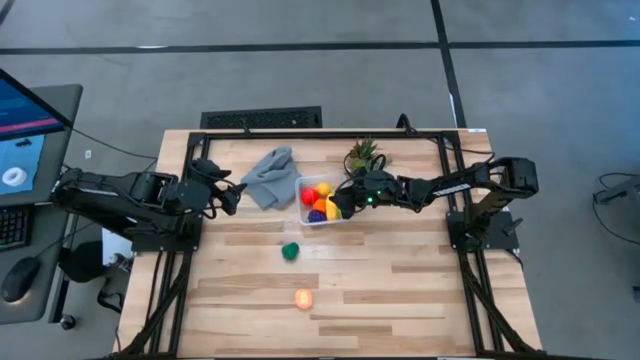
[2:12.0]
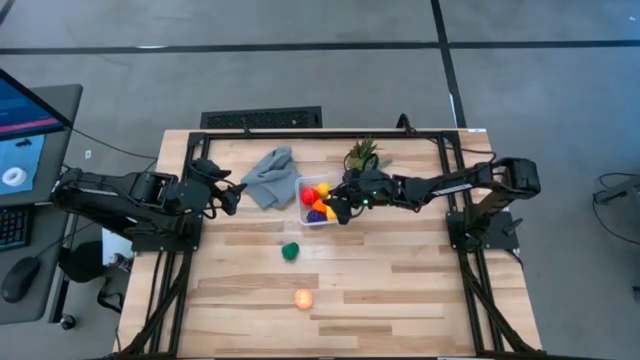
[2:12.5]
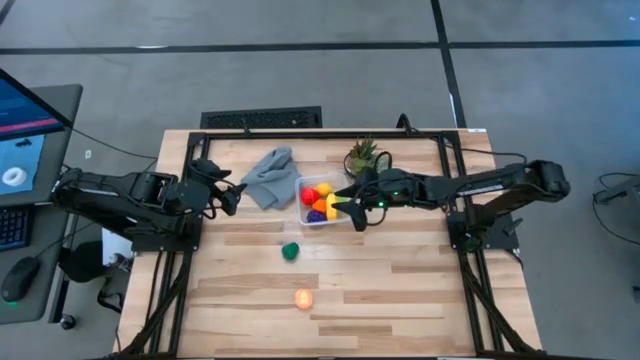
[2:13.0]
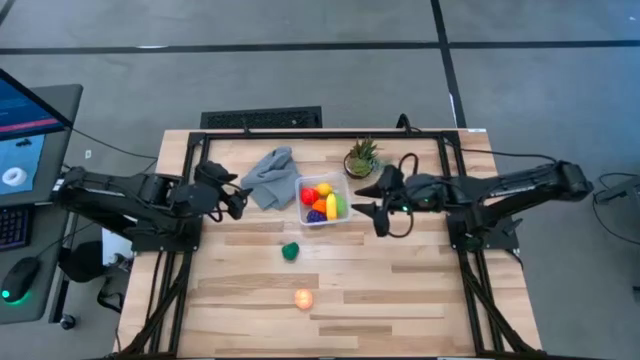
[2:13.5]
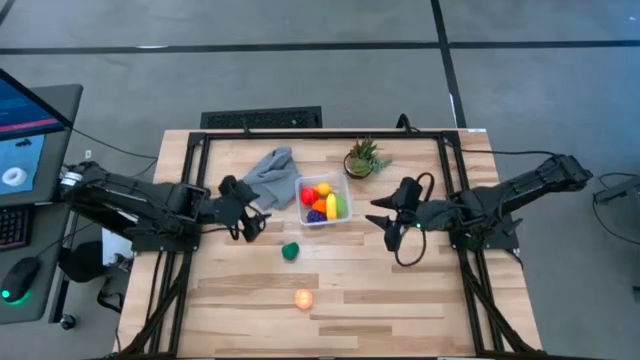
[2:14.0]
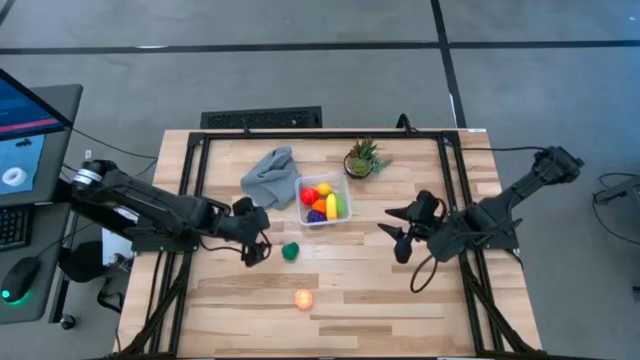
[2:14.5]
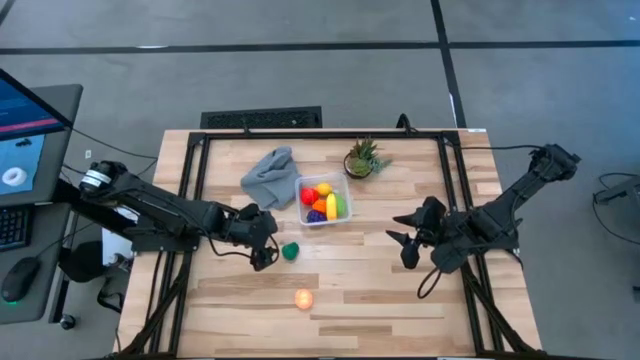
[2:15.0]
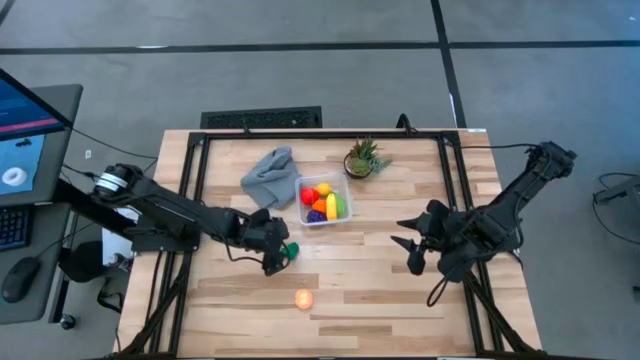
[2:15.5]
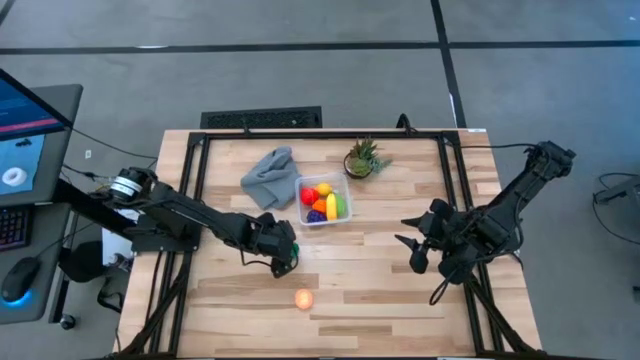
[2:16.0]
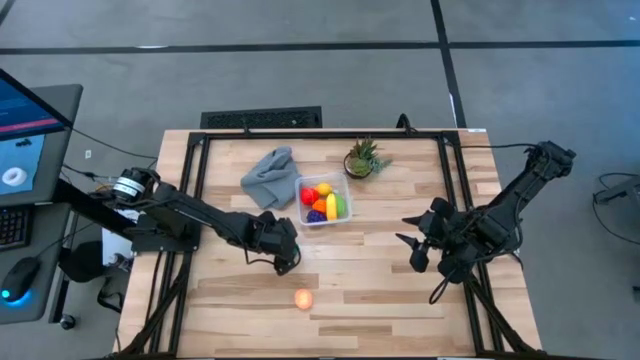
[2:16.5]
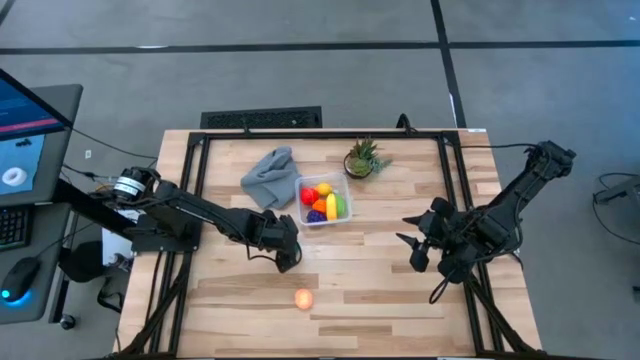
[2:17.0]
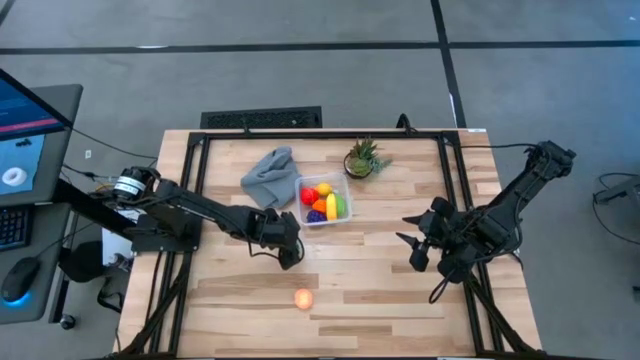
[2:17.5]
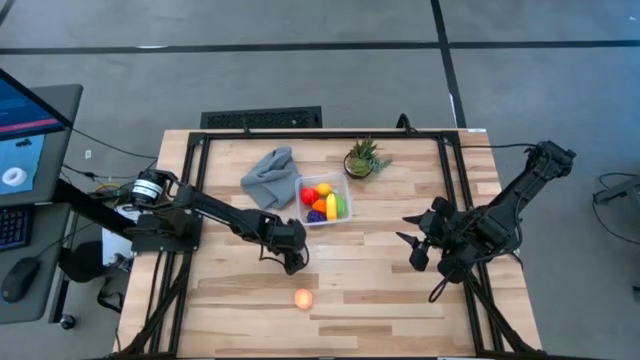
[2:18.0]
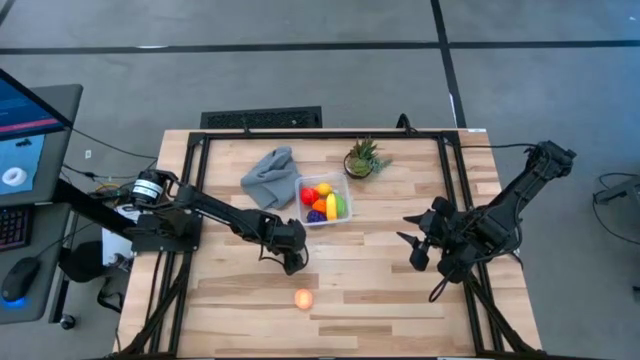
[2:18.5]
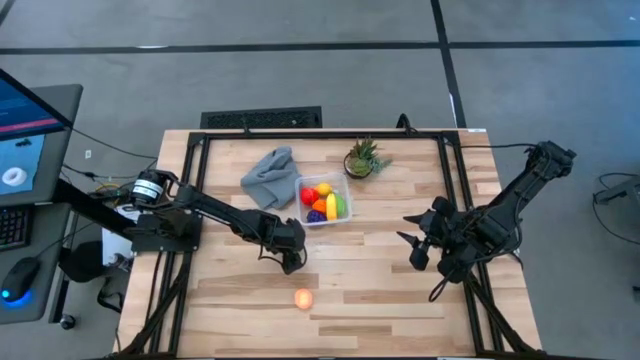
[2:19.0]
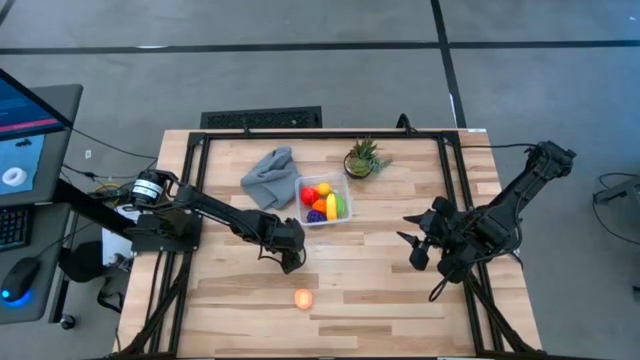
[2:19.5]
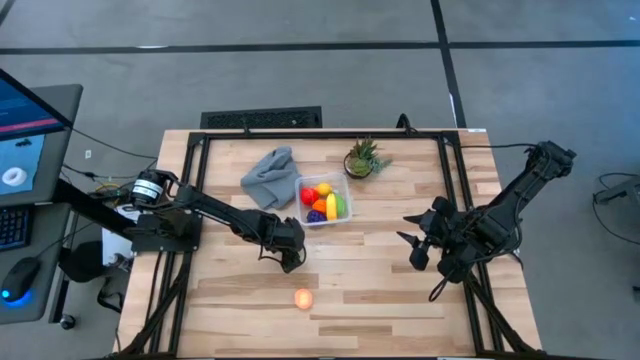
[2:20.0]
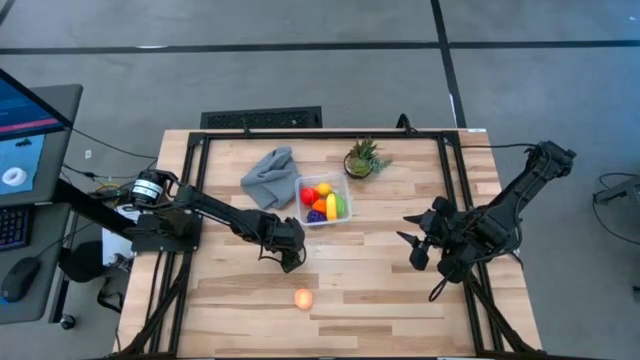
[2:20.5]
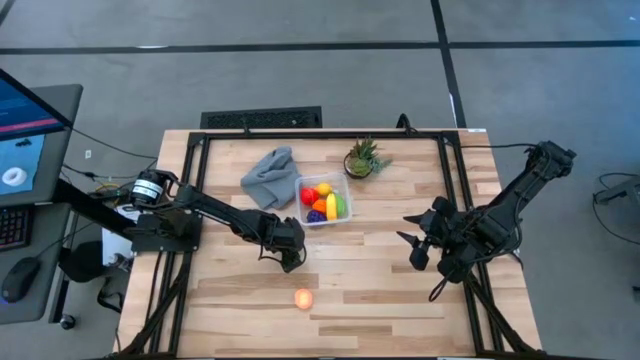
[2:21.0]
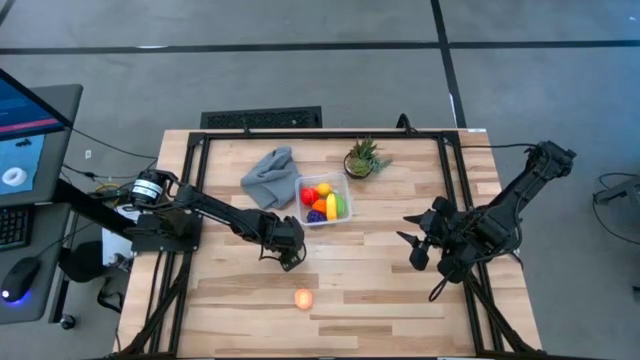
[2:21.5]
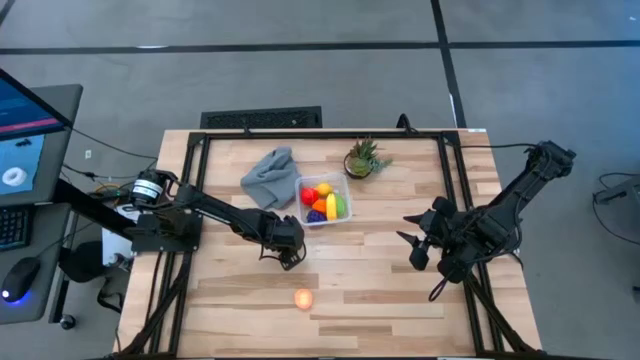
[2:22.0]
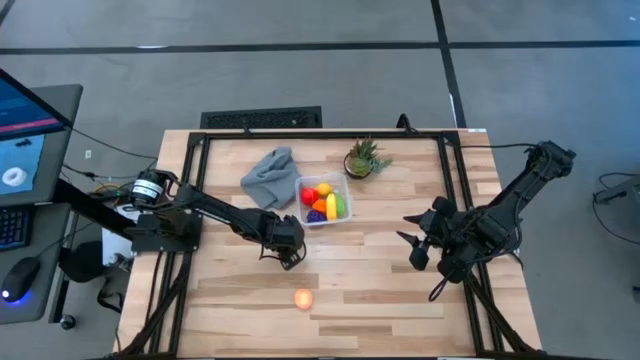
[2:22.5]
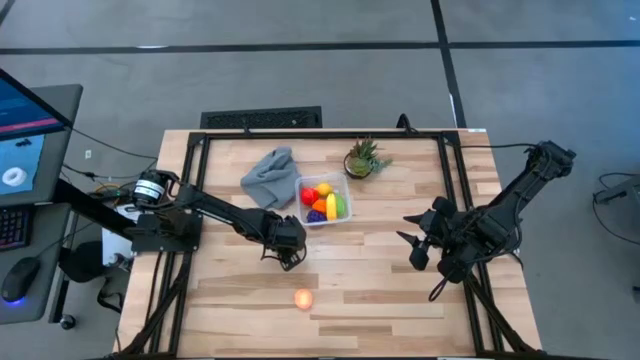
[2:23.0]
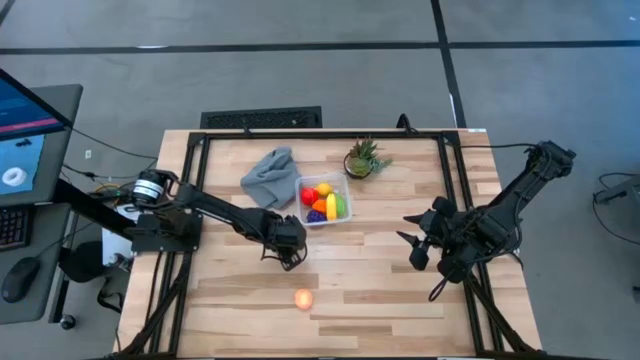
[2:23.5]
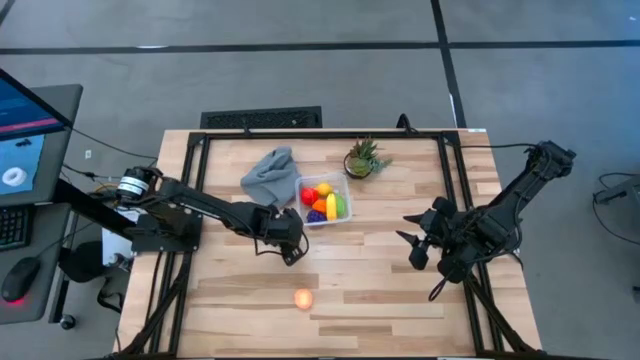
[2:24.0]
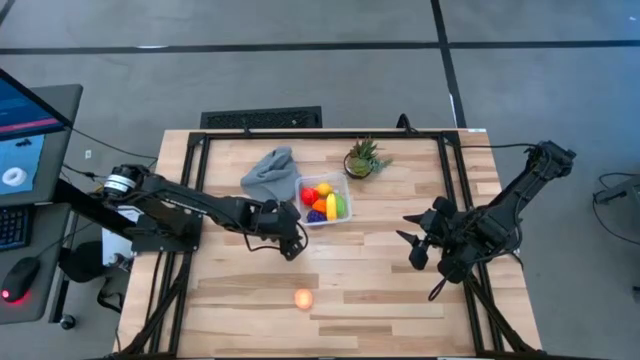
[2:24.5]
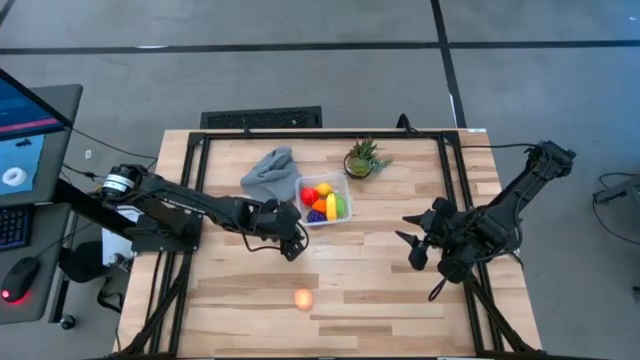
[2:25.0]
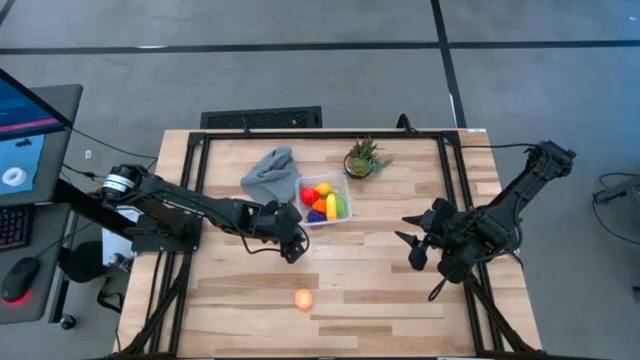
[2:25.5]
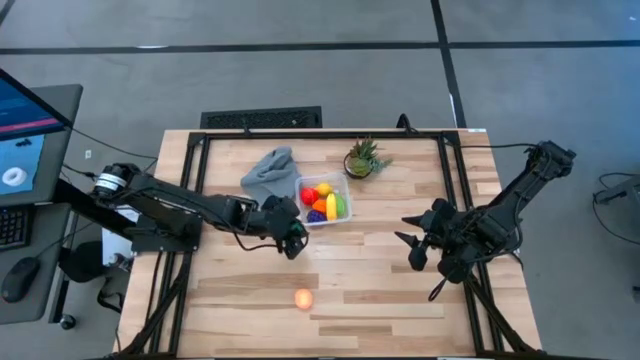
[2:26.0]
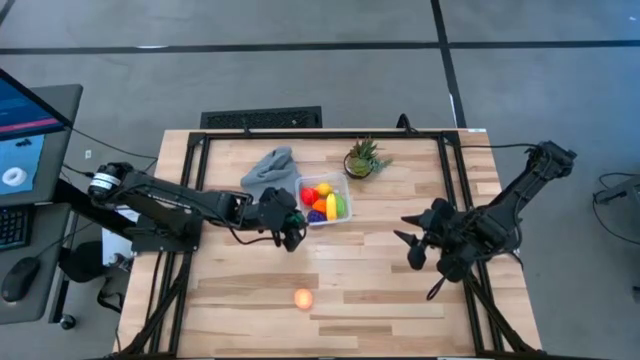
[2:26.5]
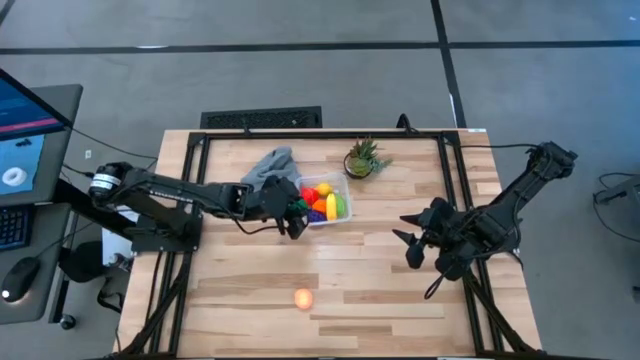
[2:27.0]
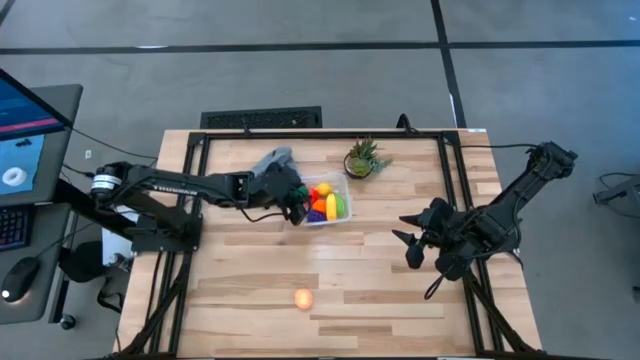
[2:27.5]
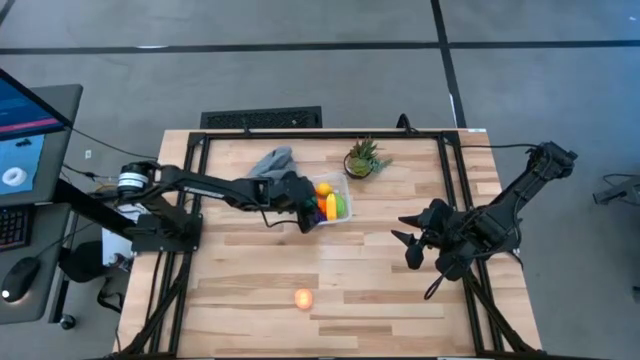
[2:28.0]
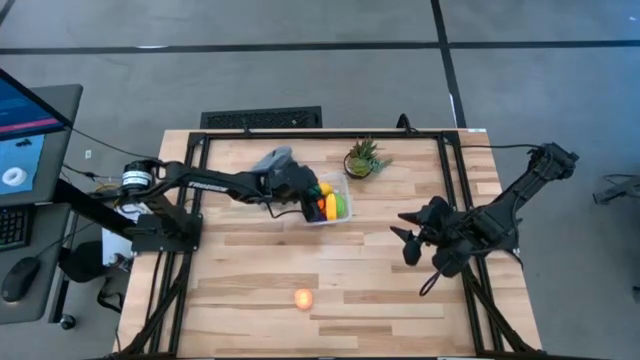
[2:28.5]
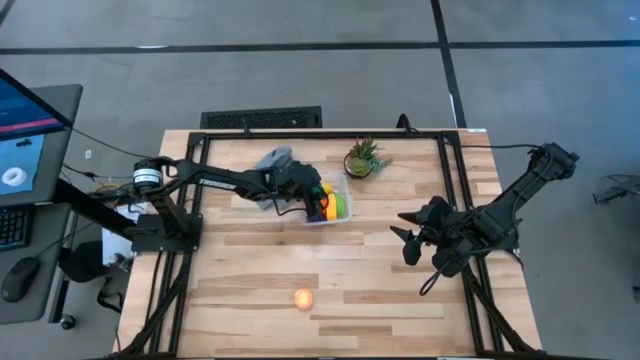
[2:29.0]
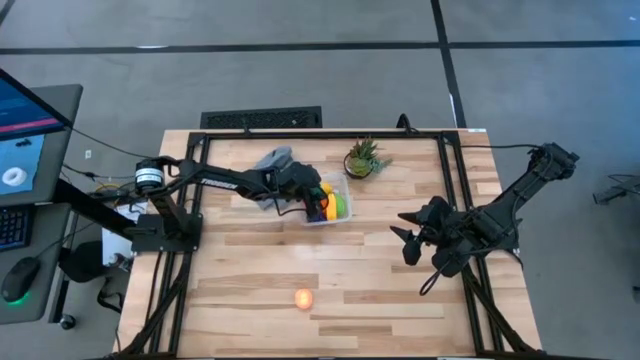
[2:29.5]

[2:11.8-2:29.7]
Task: Pick and placing Produce into tupperware
Put the green bell pepper into the transparent bin

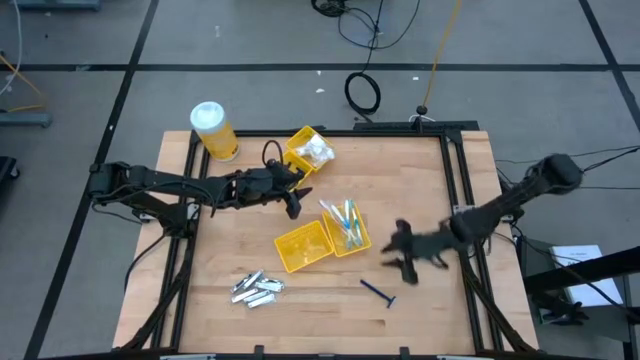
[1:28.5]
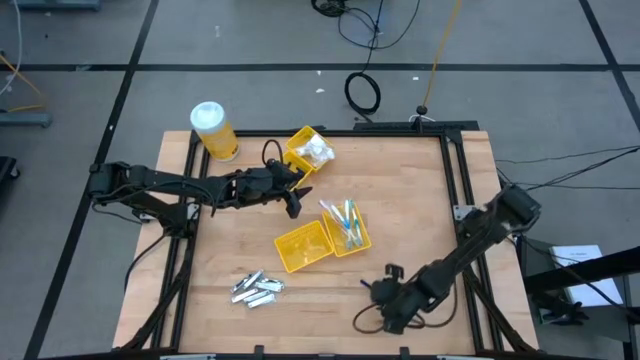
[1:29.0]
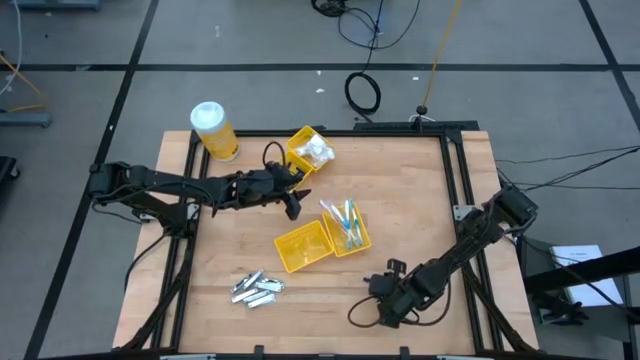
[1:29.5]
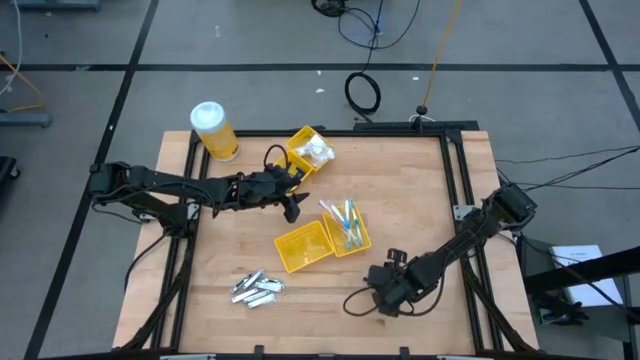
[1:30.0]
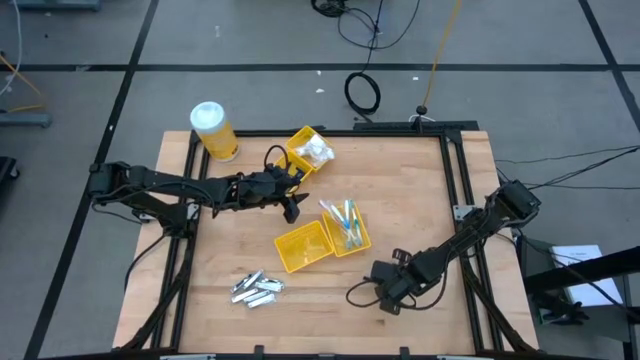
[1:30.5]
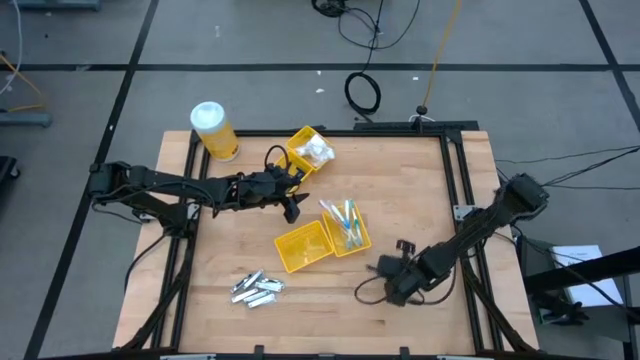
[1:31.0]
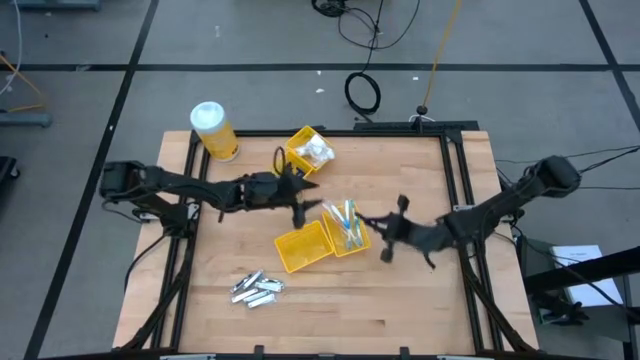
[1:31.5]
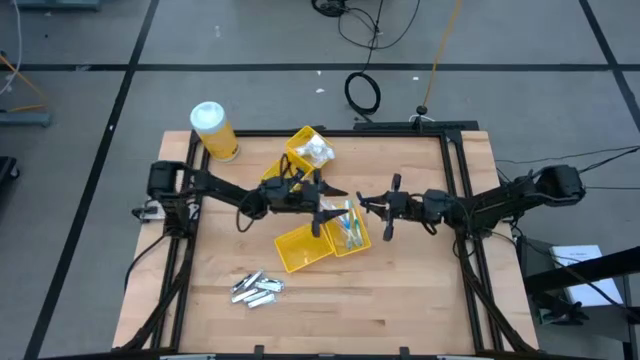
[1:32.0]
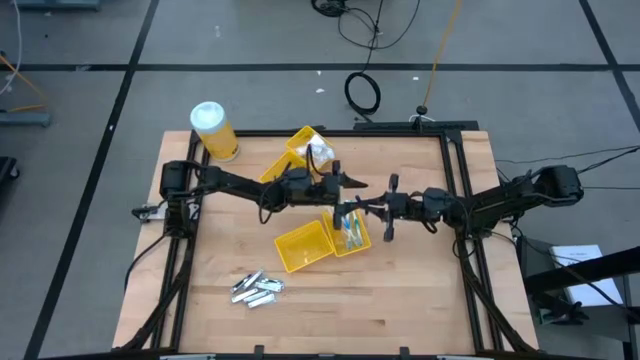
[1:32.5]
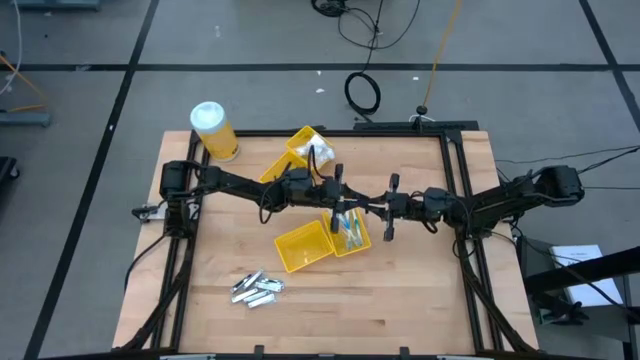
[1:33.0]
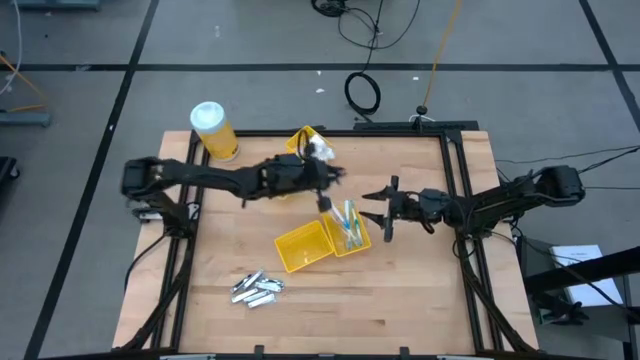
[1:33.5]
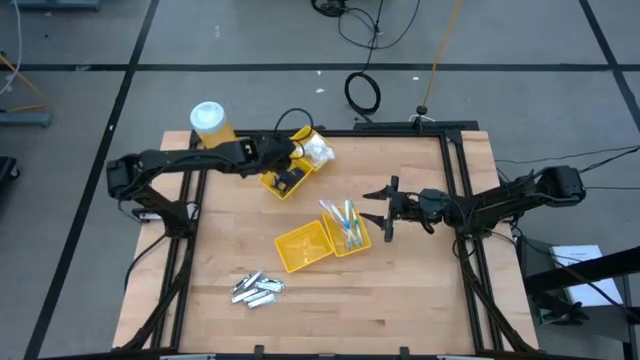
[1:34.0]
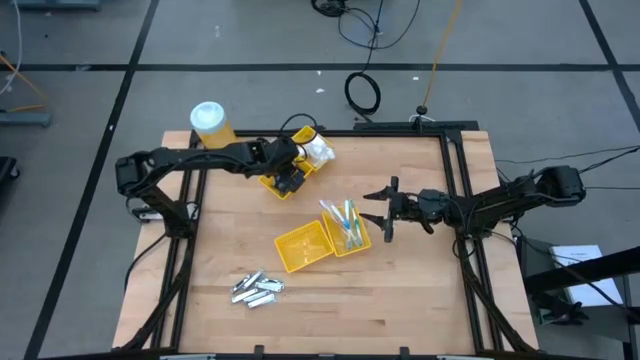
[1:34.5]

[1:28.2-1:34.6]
Task: Pick & Place Travel size toiletries
Put the blue razor into the bottom left yellow basket
